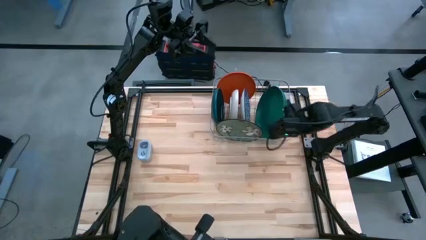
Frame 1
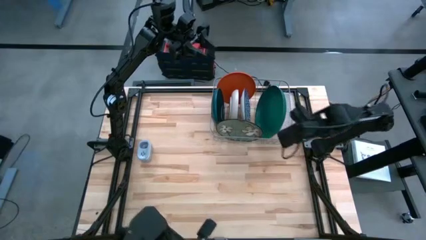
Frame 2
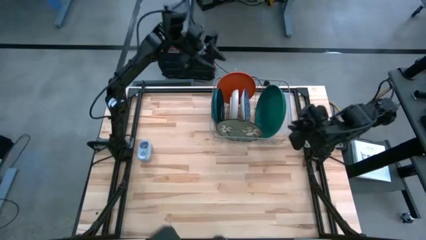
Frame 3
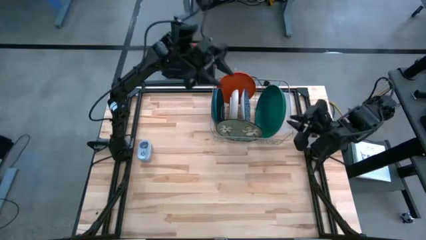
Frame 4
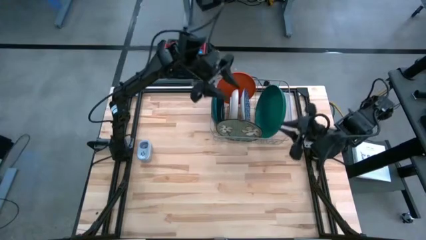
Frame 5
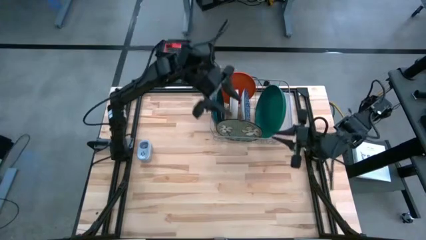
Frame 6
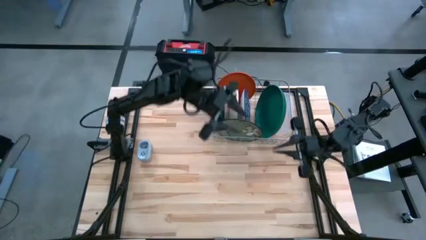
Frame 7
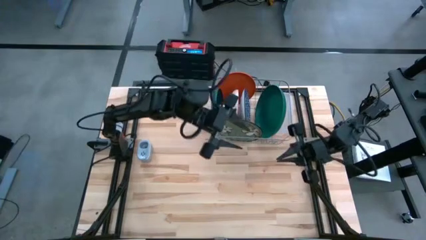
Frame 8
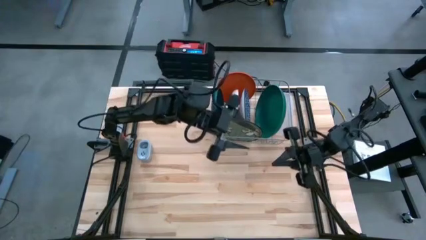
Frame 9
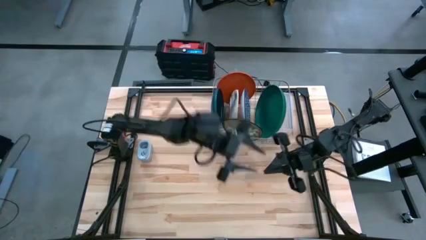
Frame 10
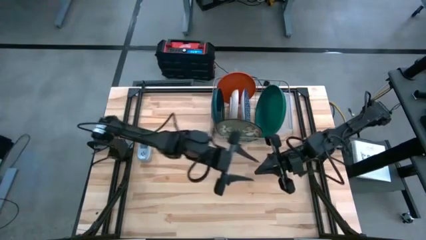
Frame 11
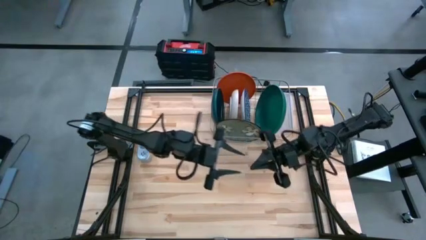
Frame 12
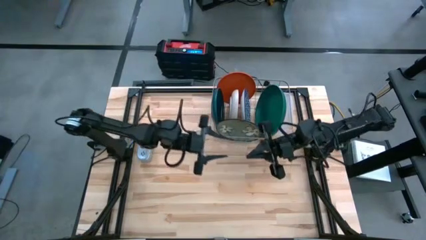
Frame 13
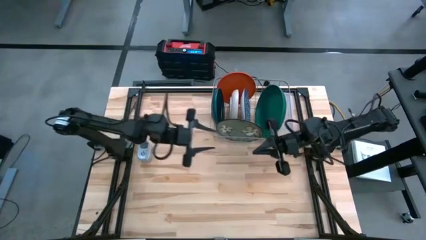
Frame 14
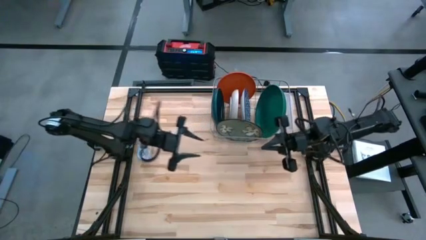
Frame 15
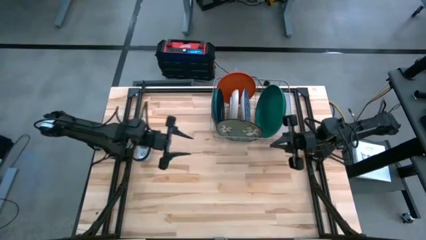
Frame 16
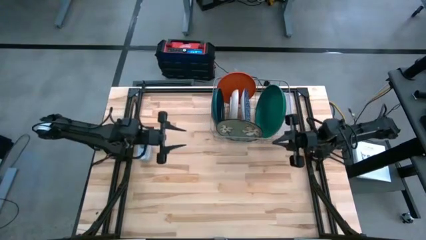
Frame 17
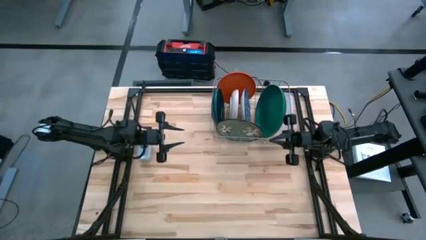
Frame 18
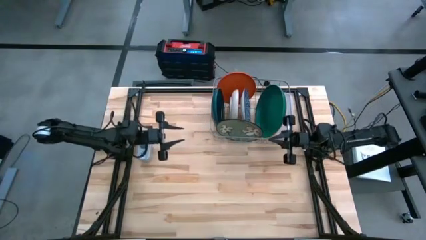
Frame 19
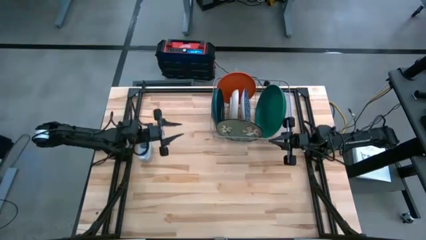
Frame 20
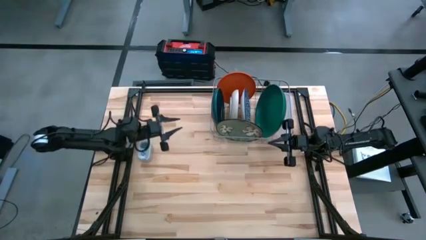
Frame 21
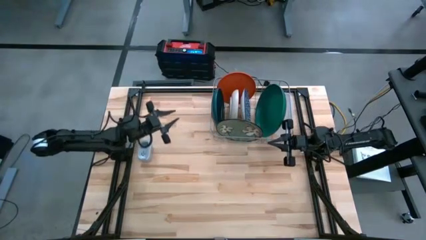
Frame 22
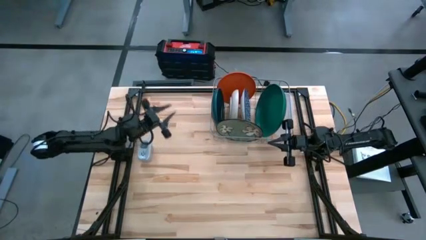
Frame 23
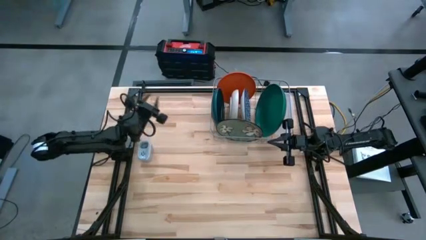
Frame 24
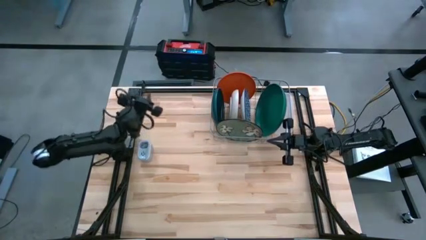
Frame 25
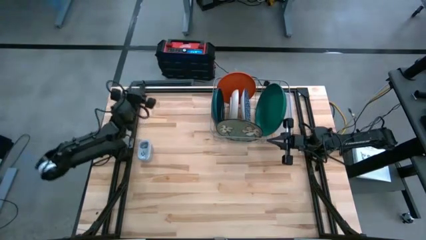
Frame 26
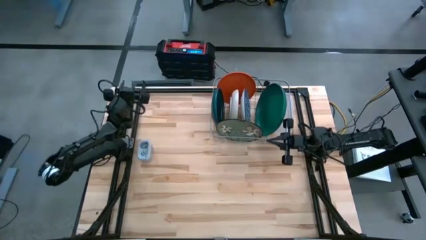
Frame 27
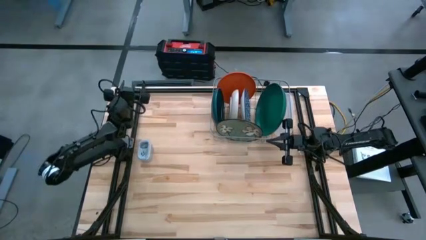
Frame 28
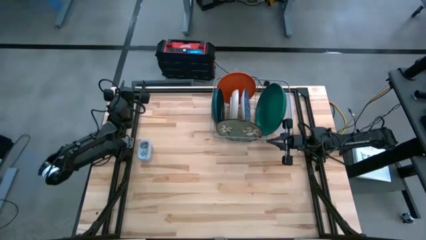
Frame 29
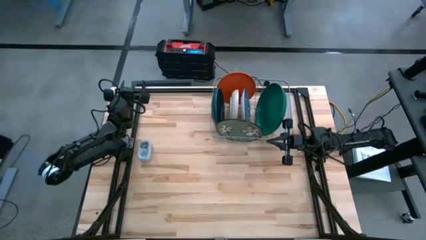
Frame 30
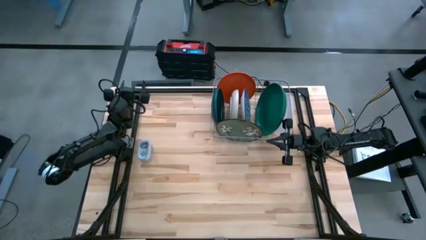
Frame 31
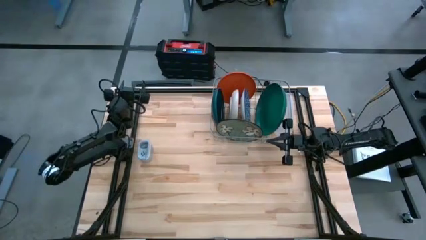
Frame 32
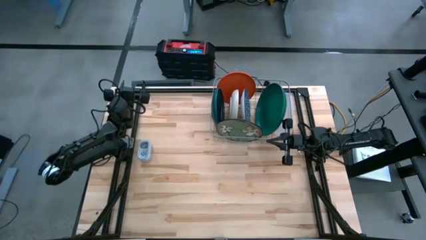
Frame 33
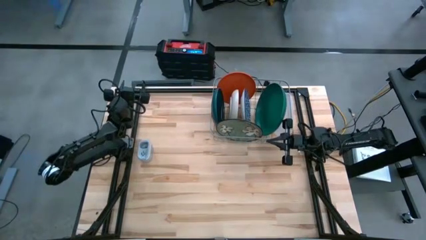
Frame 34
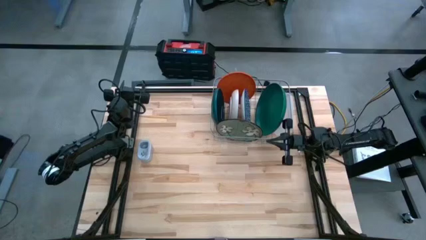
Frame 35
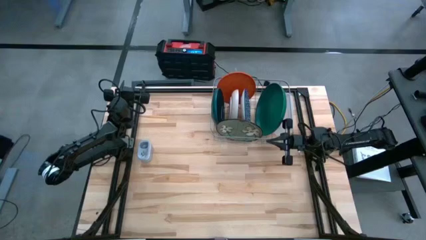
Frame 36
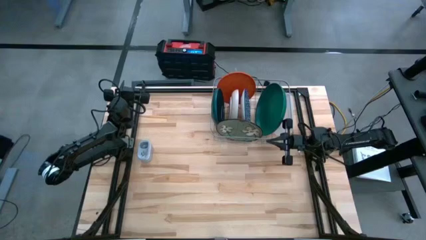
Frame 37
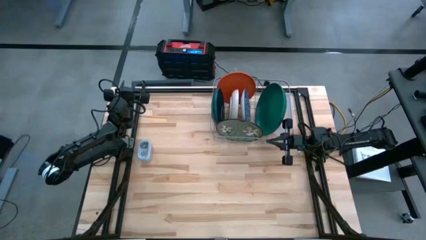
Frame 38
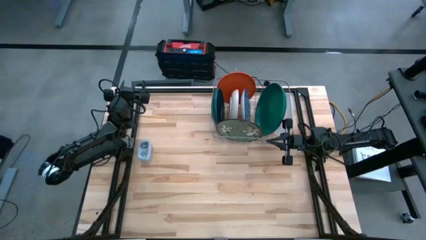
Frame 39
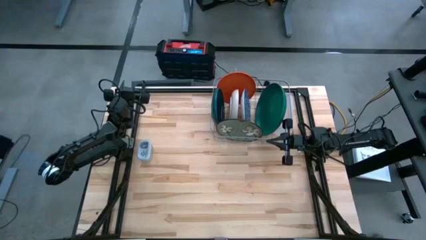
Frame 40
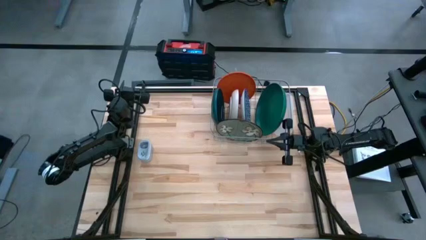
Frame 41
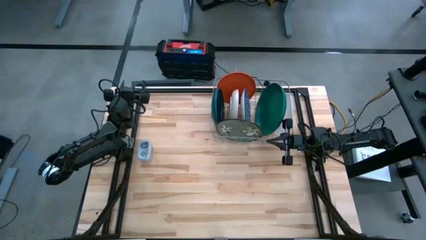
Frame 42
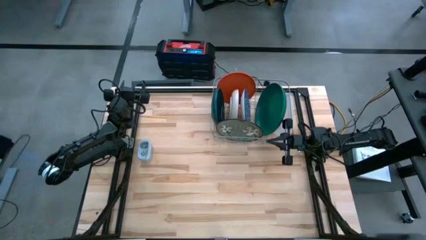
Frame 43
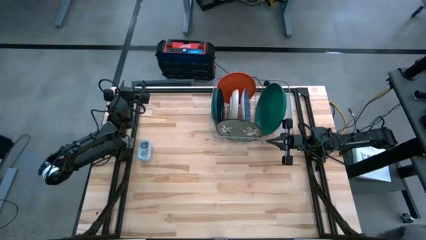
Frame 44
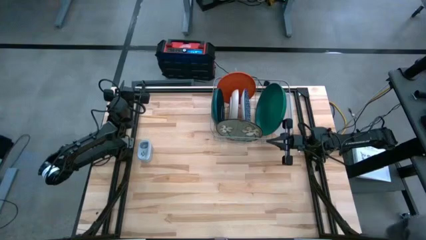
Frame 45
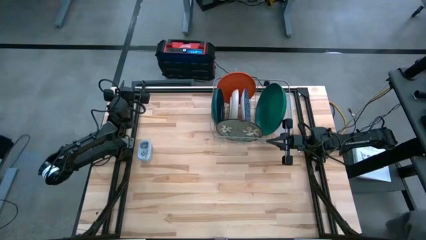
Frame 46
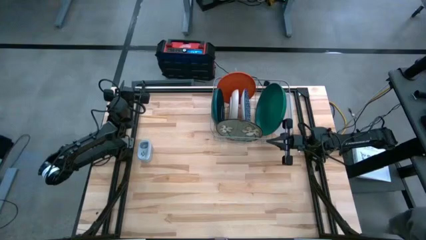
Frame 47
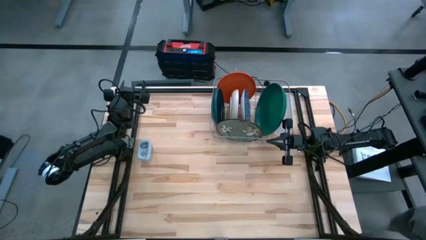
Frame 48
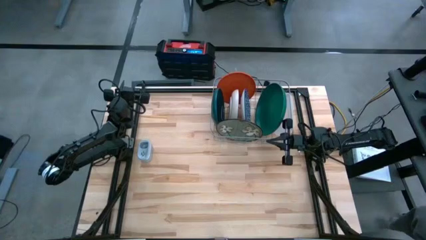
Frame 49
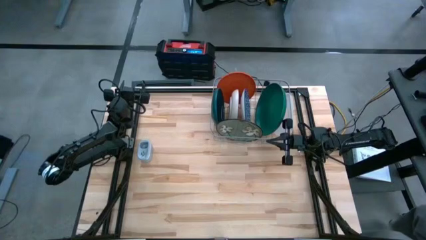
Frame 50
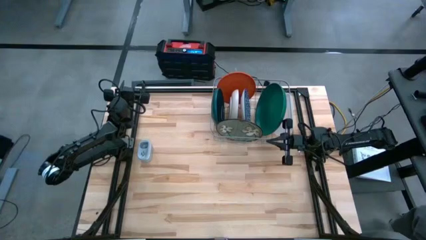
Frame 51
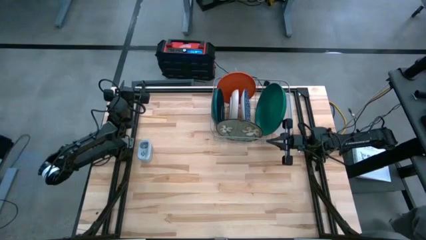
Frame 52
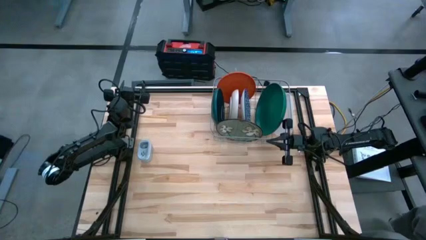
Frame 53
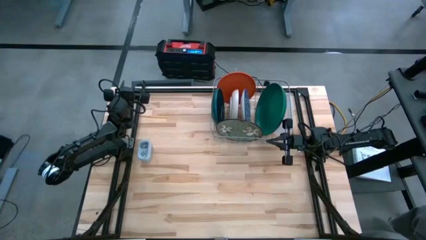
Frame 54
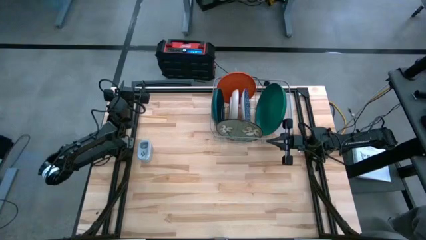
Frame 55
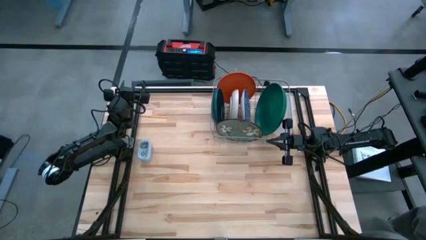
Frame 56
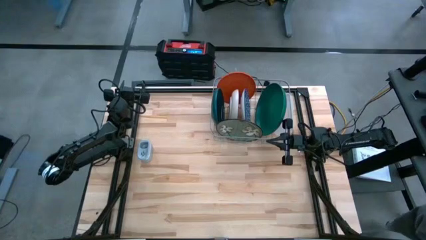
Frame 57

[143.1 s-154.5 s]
Task: Sort dishes
Return to Home Position

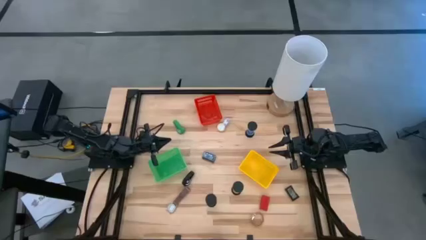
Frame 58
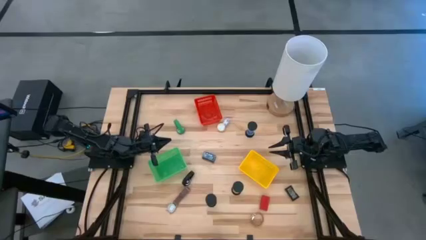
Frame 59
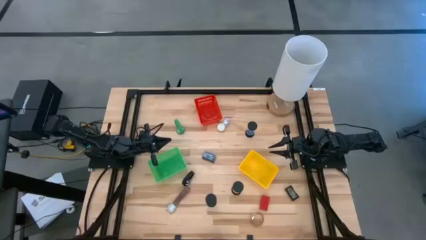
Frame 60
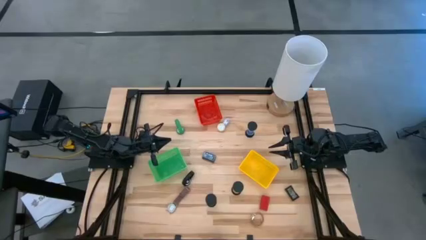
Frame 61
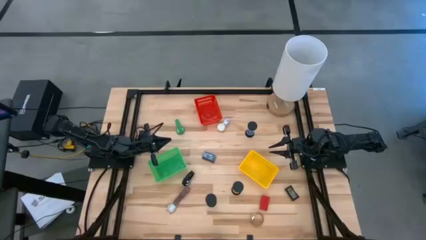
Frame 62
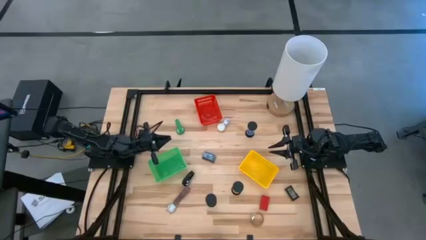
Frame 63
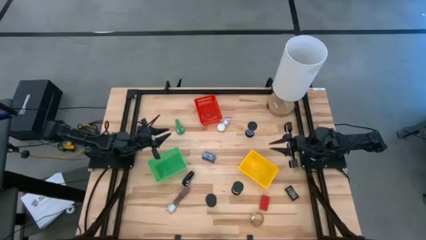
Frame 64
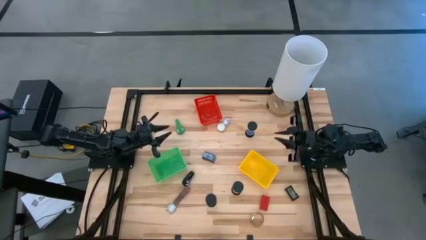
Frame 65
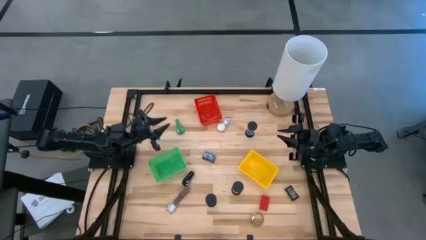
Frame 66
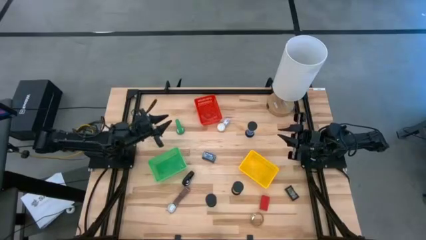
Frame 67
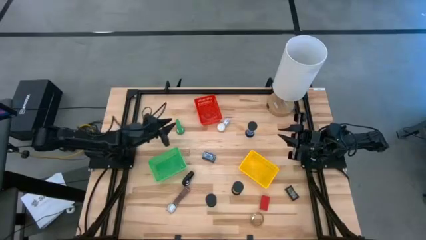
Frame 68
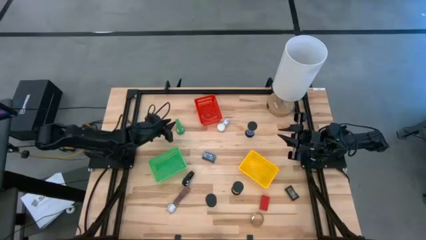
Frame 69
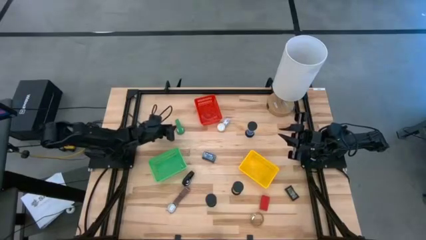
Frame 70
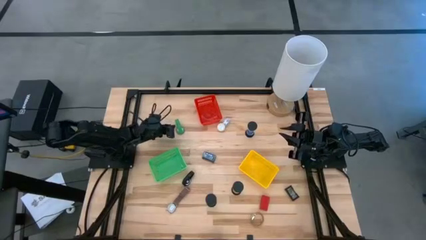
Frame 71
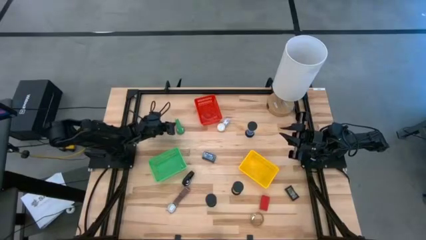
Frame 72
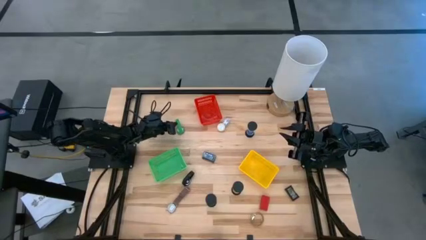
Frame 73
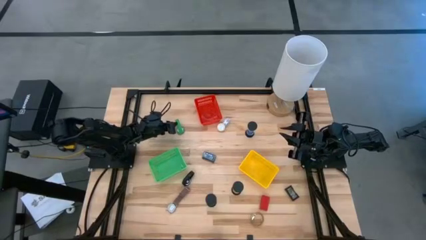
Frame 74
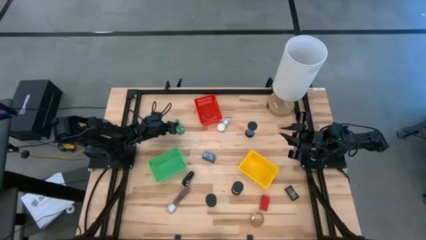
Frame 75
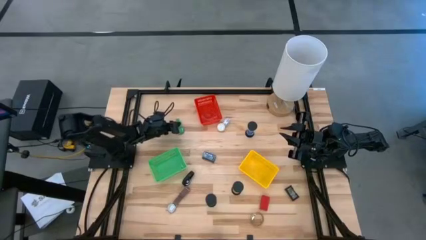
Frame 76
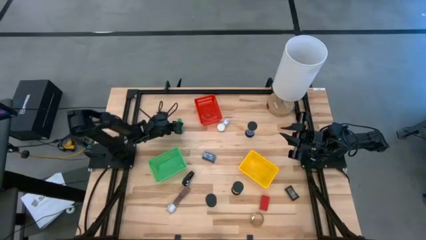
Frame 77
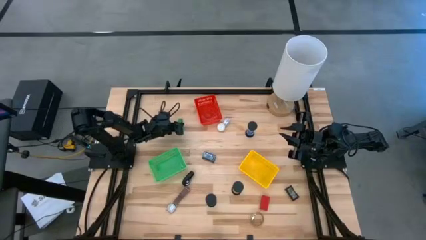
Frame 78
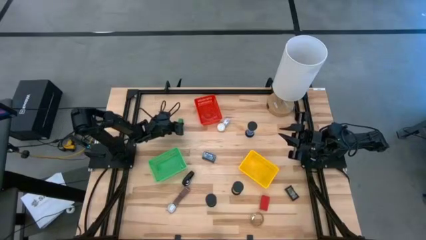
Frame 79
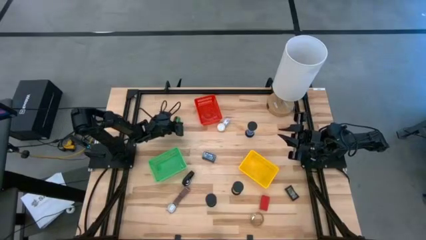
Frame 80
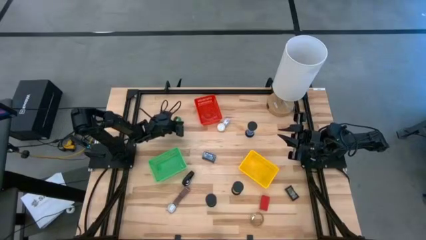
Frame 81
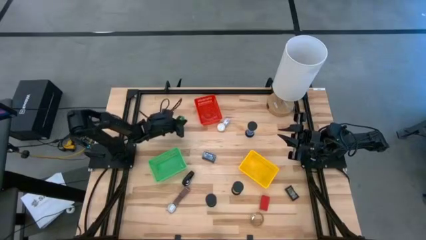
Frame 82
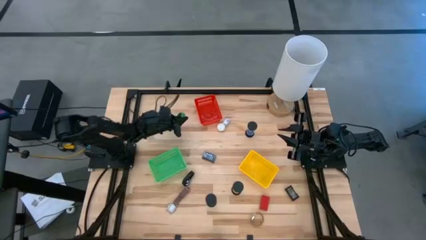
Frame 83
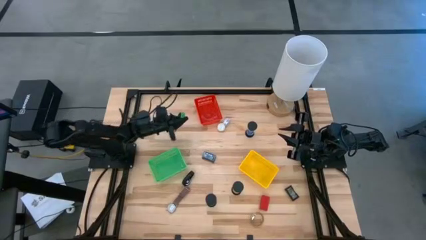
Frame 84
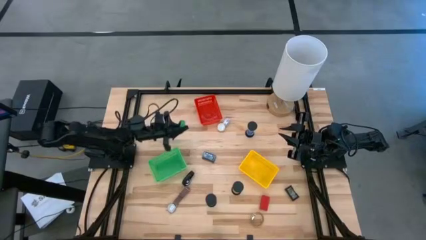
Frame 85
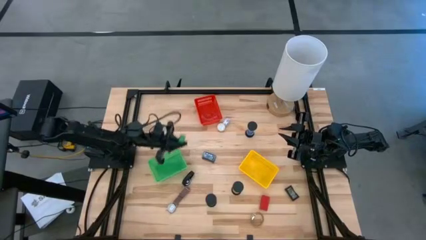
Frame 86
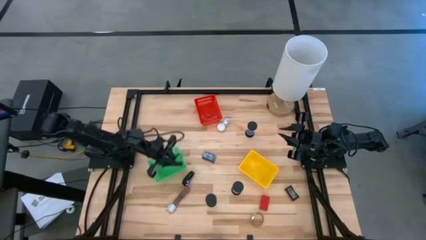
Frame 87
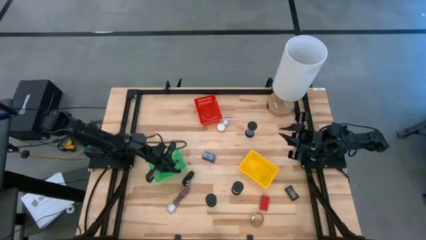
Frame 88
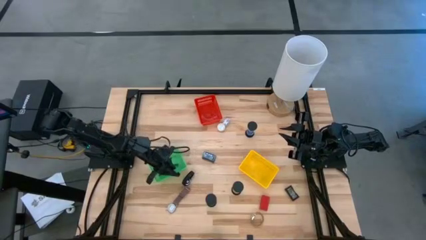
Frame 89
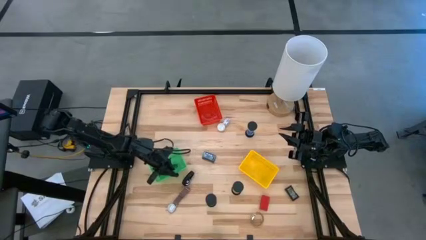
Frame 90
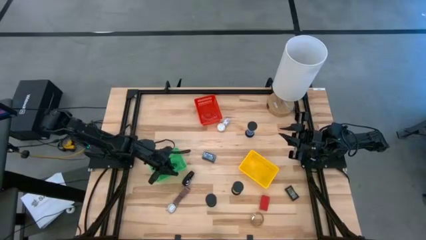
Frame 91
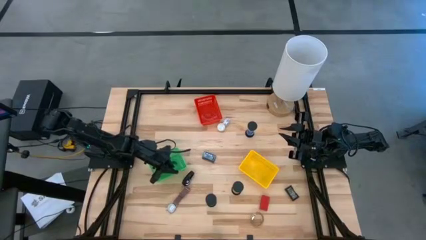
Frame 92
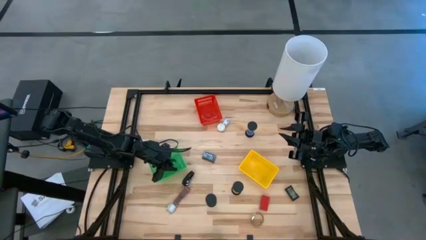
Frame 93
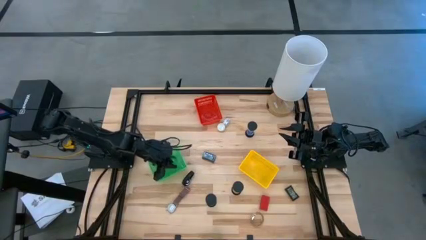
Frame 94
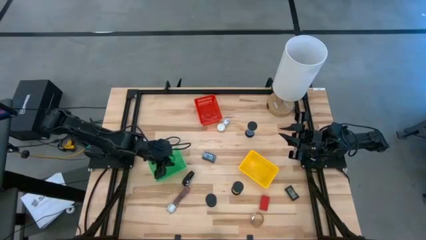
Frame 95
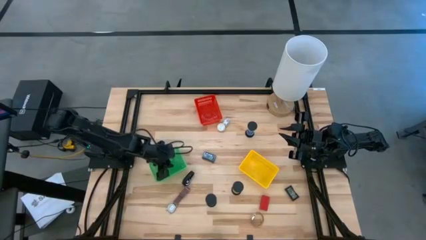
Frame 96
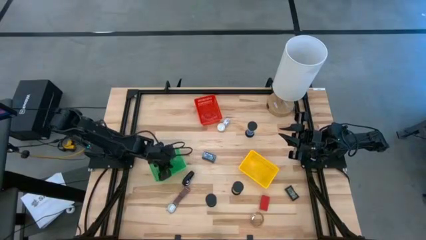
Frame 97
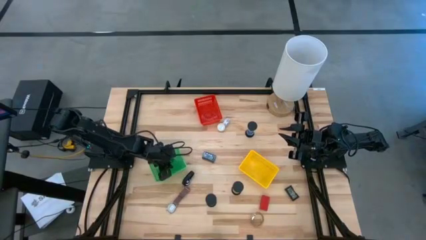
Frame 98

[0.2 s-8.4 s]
Task: Pick & Place Office items
Put the green wrist watch into the green bin
